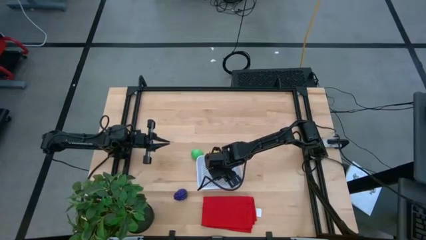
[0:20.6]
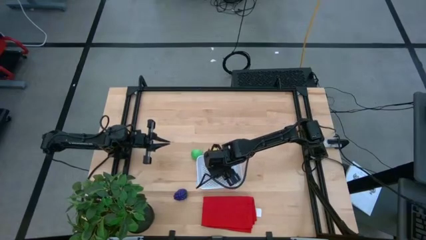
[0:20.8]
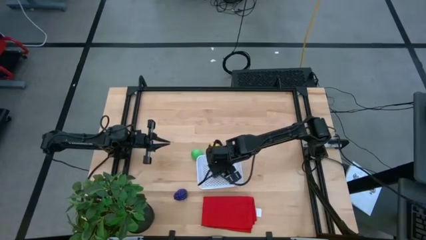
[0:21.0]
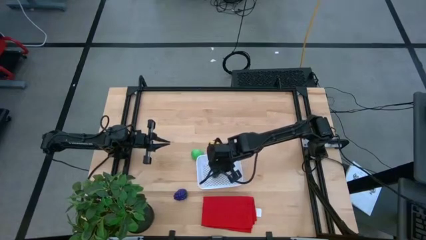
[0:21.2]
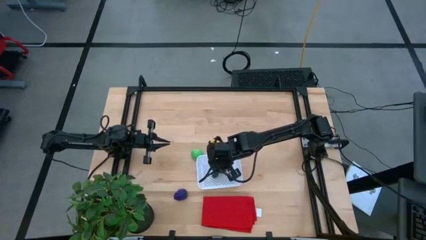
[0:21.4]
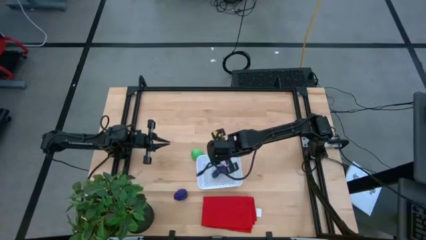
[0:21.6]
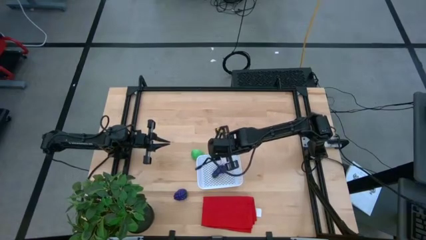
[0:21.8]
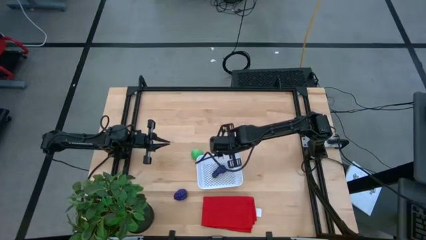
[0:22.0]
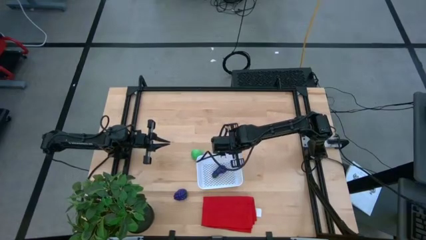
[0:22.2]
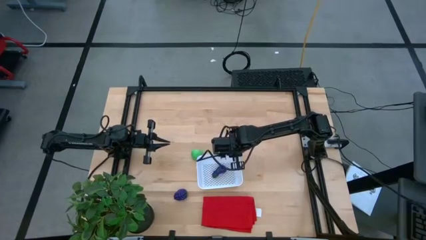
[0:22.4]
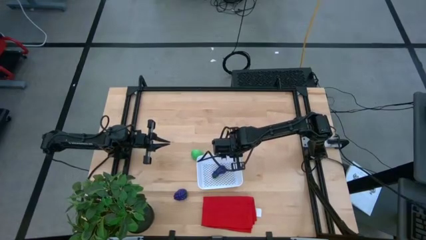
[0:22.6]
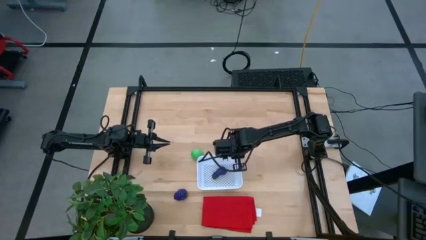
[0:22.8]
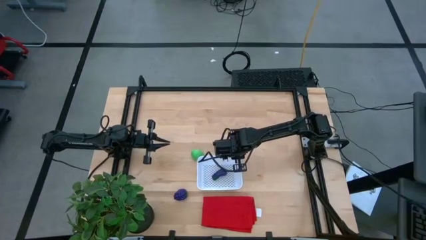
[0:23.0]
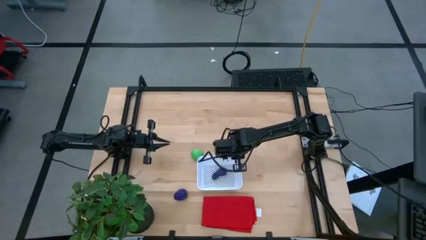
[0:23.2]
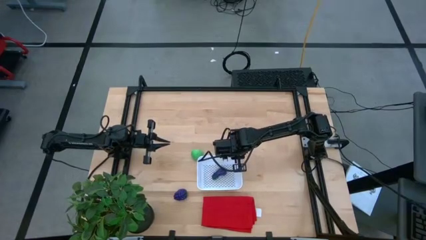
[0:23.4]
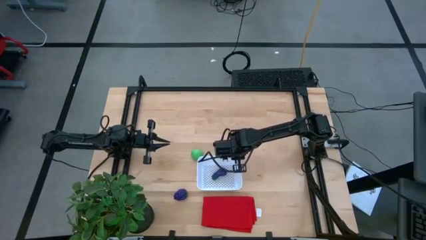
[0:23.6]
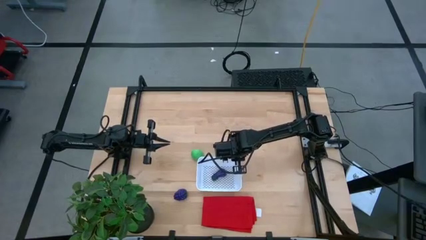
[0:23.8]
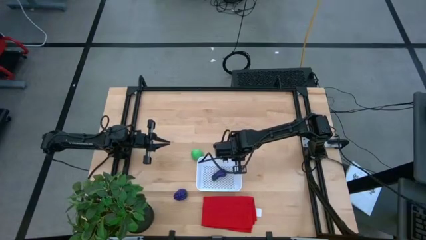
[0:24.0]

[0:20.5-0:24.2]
Task: Pick and placing Produce into tupperware
Adjust the white bin

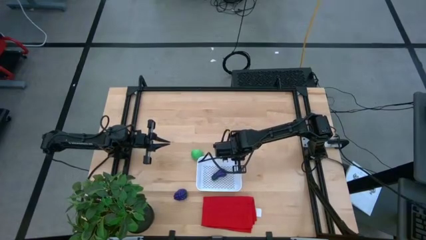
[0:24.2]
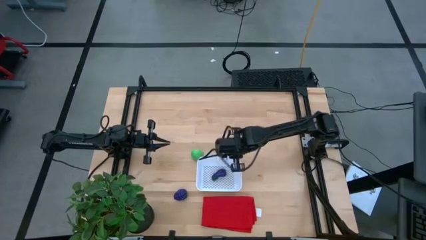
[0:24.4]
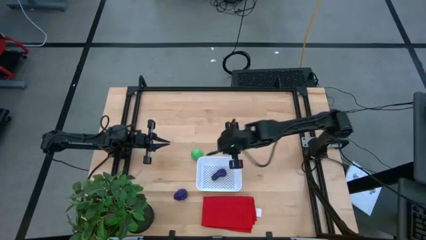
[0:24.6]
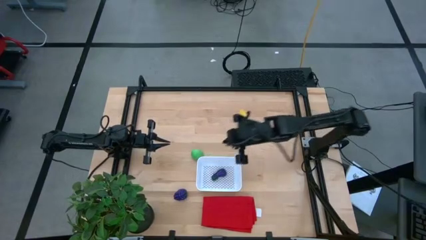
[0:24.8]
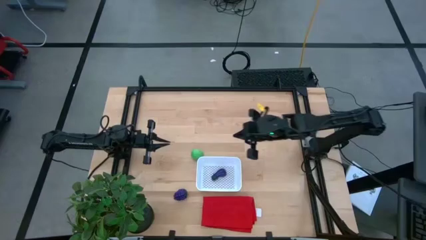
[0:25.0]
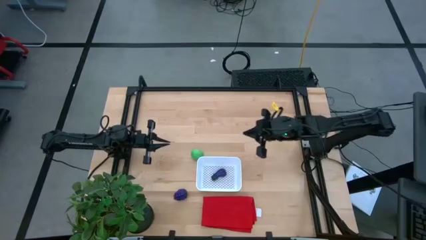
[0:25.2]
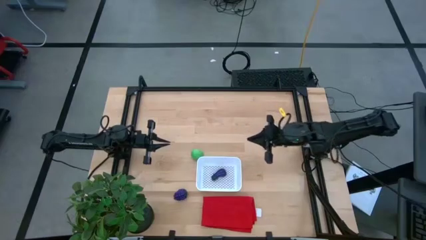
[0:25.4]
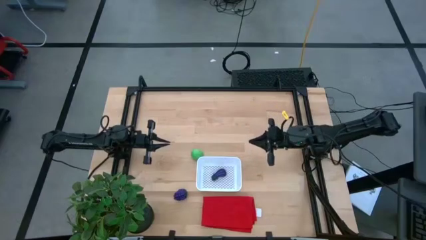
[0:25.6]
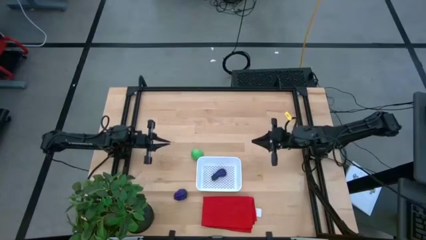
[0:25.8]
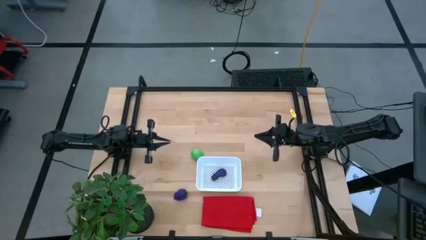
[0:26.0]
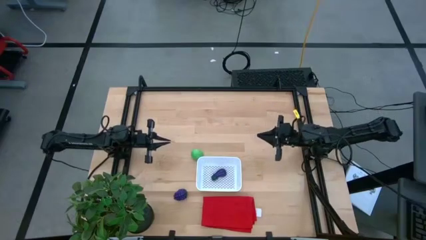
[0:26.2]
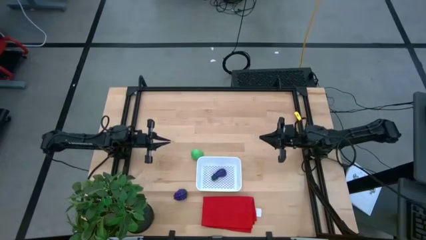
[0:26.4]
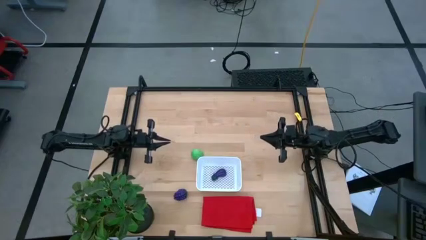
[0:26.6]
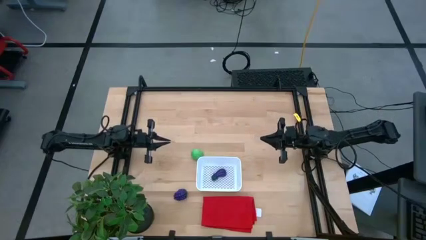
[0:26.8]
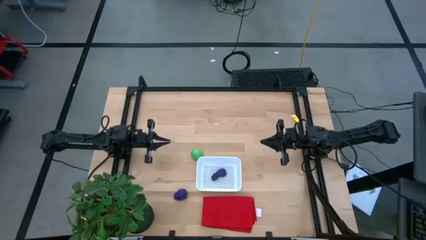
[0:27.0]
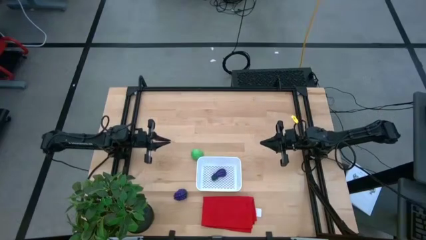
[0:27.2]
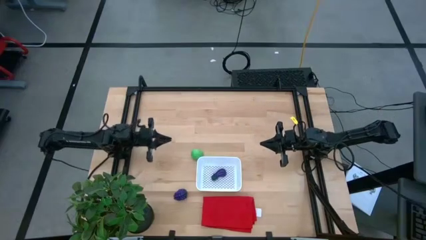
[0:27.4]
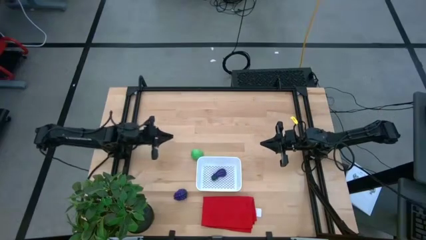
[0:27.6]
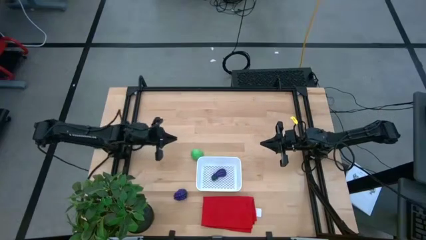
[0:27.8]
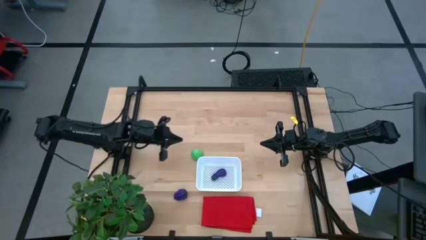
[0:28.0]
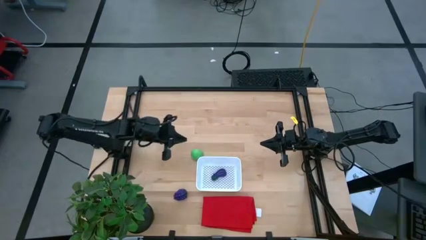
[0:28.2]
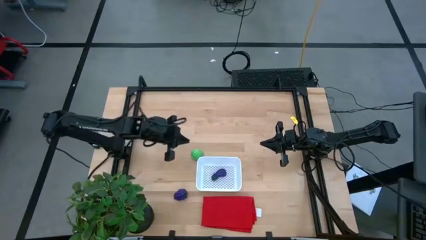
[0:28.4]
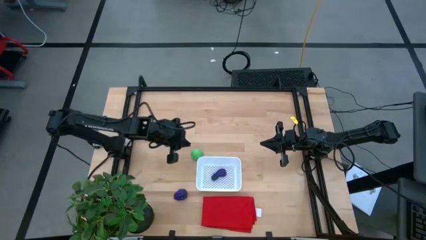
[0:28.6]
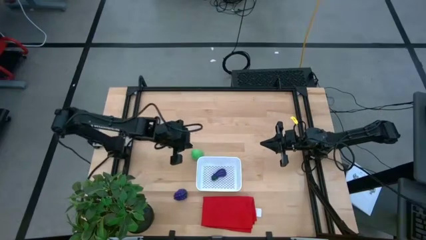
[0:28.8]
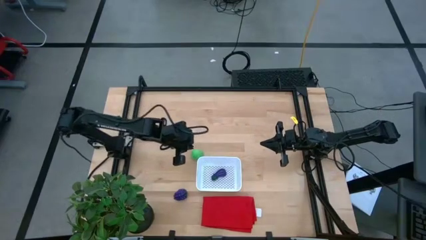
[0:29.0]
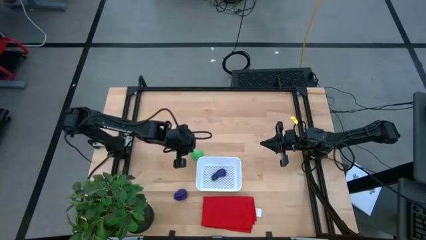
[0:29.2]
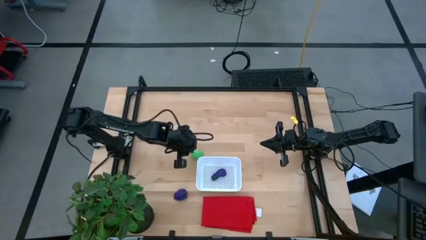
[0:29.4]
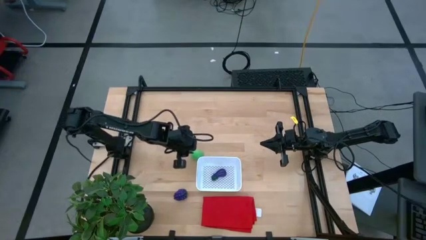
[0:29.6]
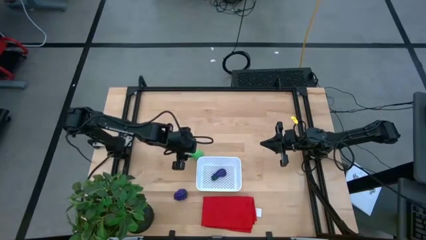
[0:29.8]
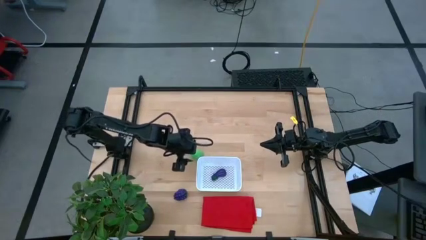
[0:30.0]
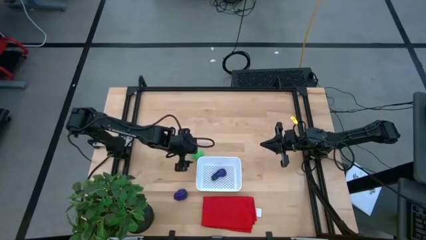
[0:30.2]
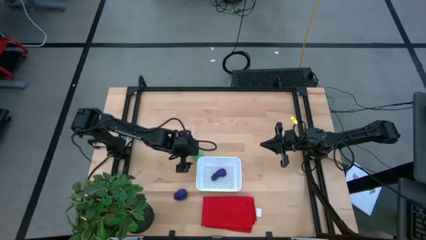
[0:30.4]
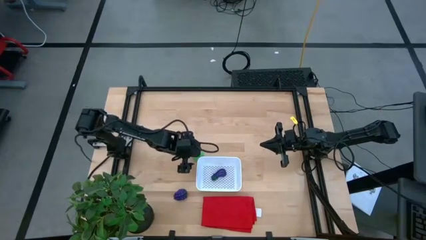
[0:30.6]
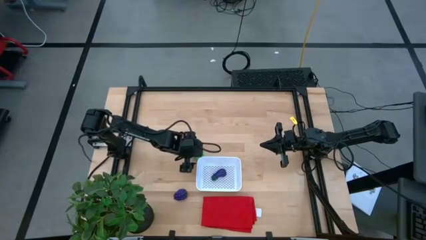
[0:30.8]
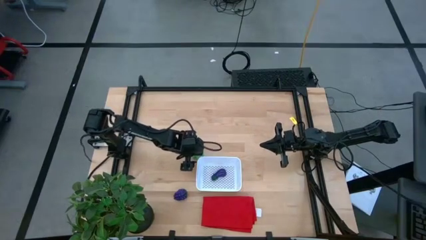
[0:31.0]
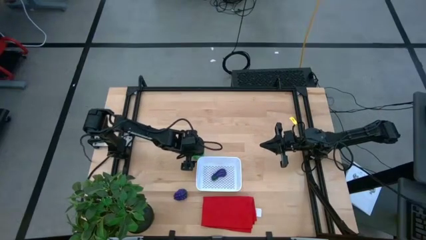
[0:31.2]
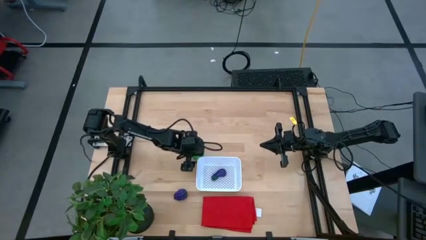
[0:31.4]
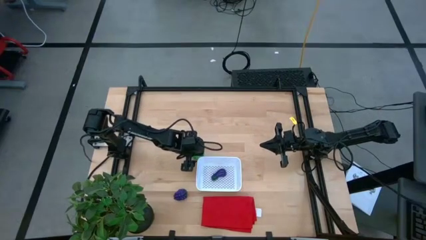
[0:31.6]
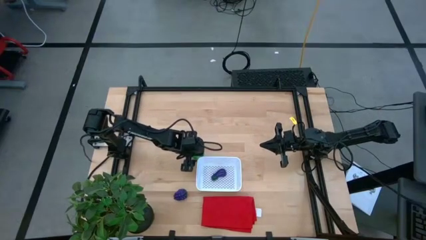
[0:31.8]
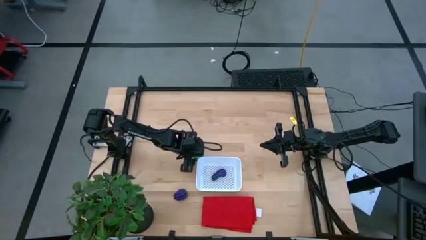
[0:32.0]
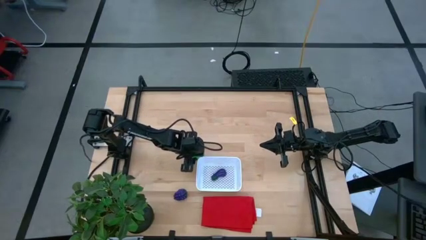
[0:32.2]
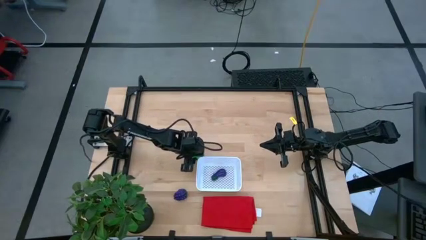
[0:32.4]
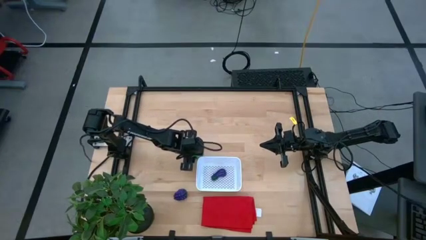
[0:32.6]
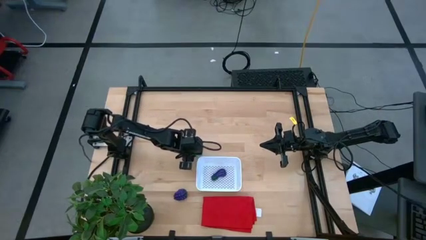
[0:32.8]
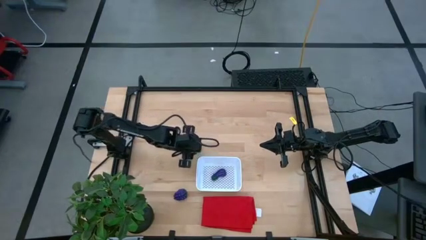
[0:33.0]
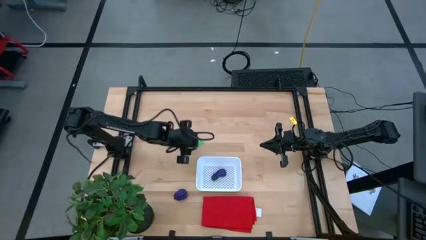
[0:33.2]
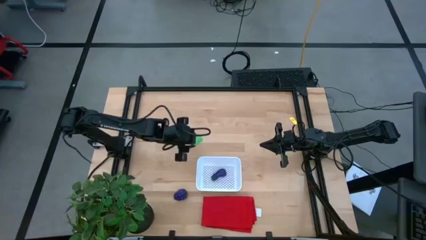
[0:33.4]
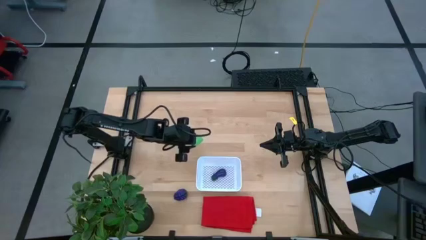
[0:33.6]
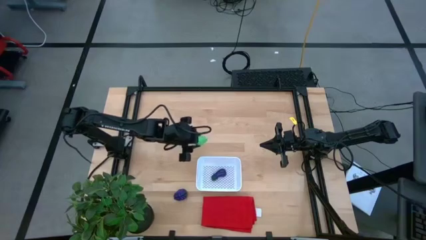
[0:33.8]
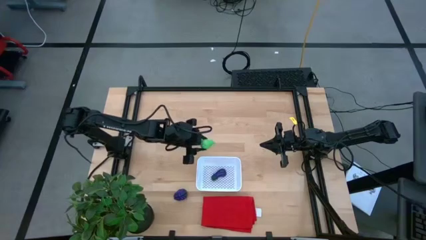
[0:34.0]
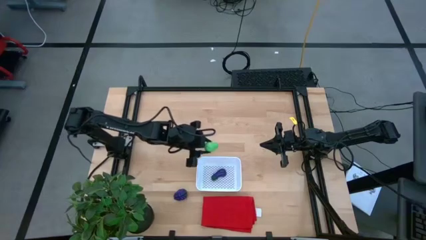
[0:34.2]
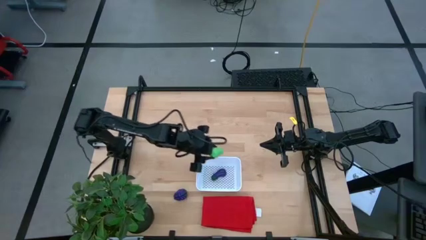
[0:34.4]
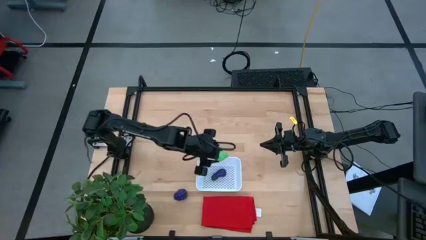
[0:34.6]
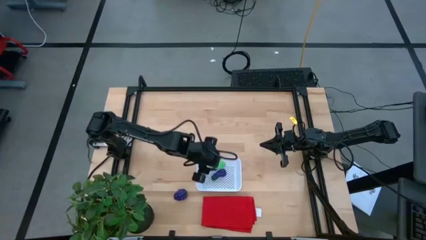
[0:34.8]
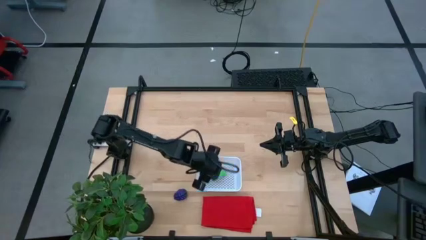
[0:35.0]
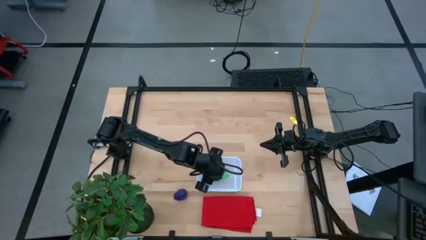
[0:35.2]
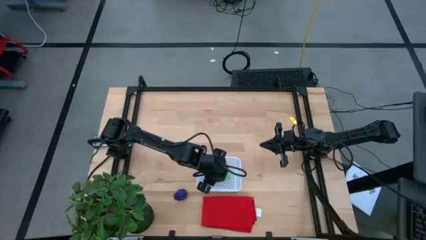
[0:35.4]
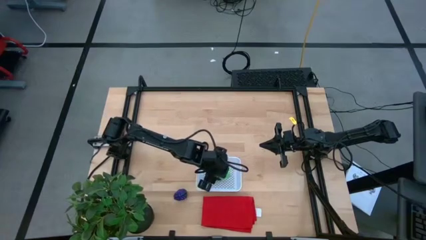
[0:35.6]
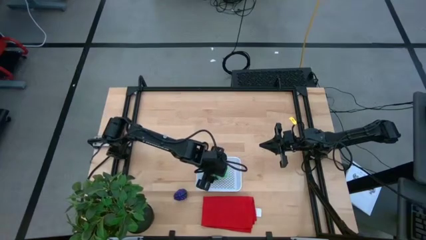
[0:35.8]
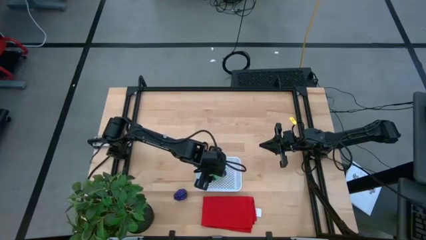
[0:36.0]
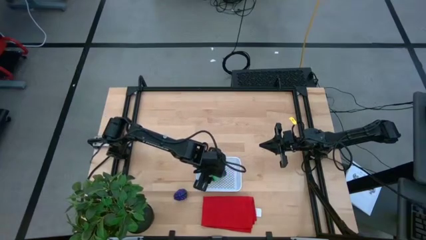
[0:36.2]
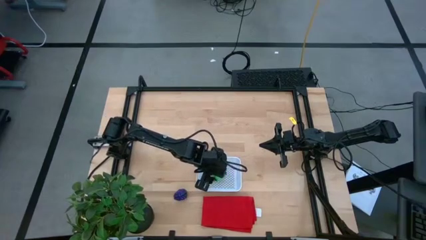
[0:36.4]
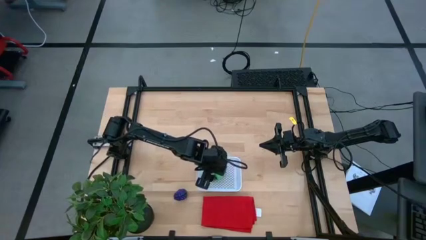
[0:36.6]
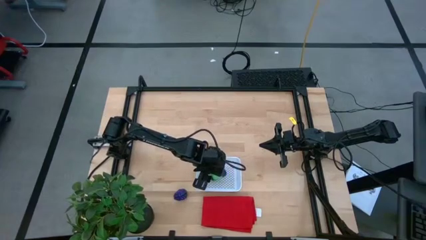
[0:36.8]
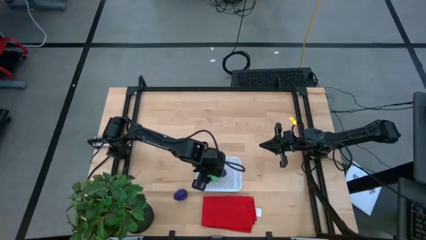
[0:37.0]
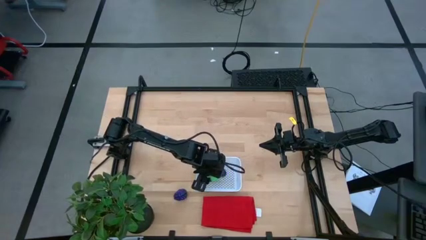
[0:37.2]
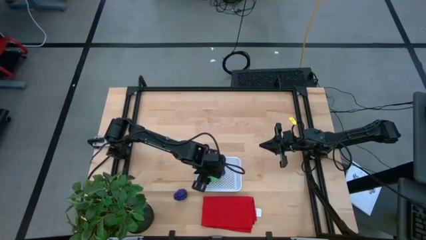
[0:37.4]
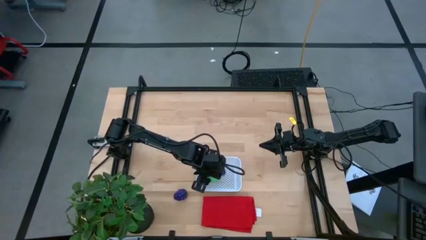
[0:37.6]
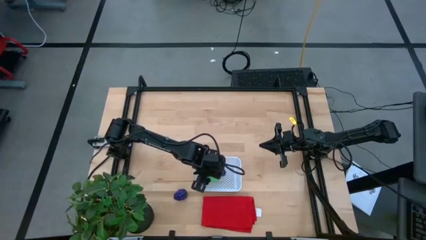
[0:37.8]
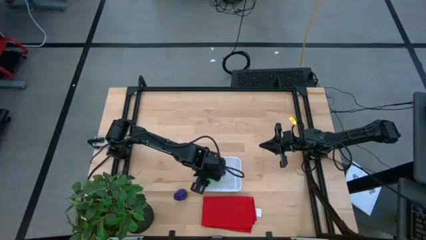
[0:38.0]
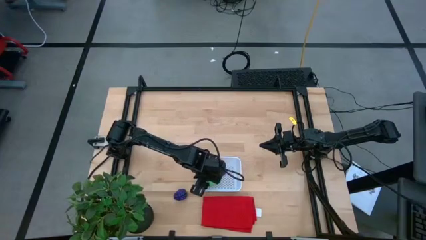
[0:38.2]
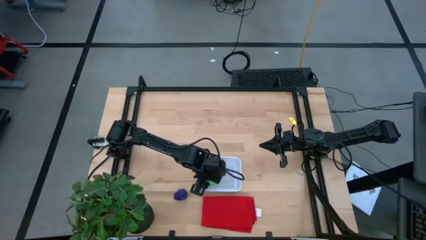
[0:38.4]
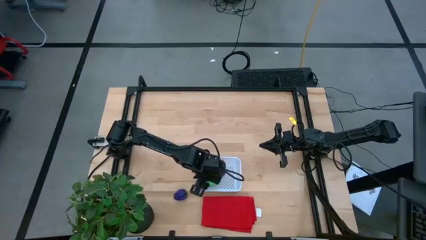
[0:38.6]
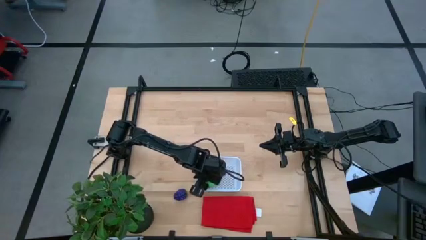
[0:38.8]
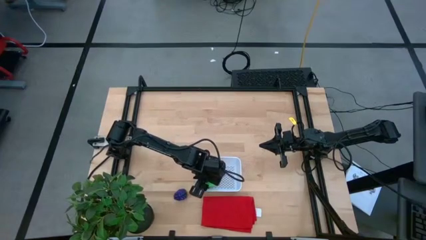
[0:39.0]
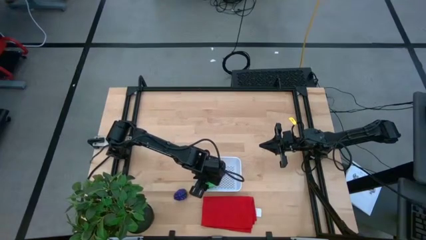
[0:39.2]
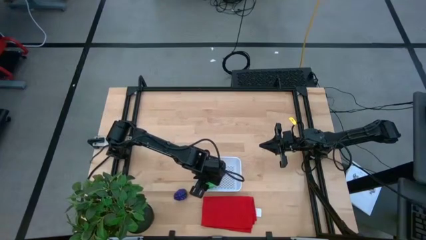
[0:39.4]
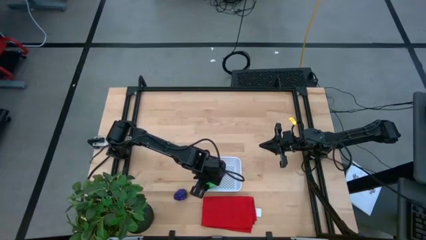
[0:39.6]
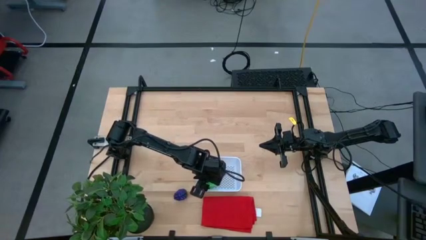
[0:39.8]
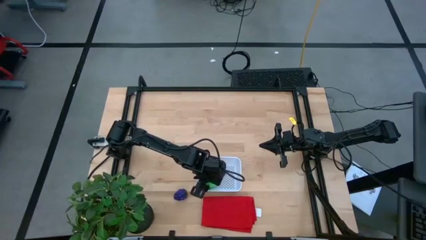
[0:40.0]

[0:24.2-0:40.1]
Put the green pear into the white bin
